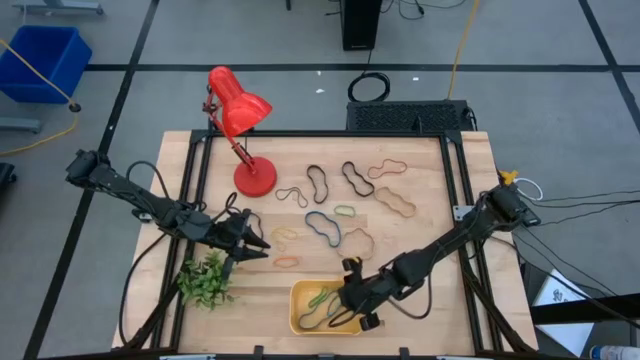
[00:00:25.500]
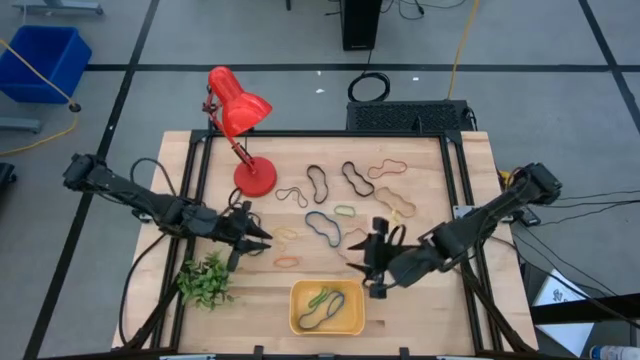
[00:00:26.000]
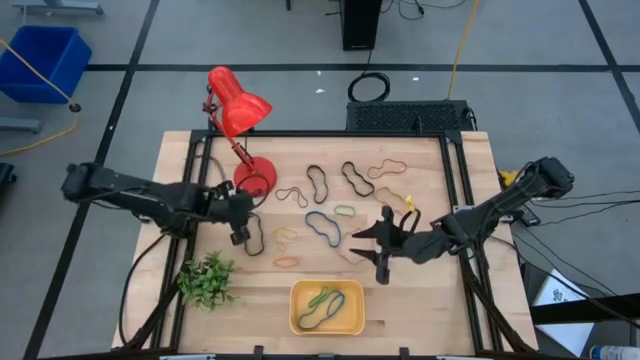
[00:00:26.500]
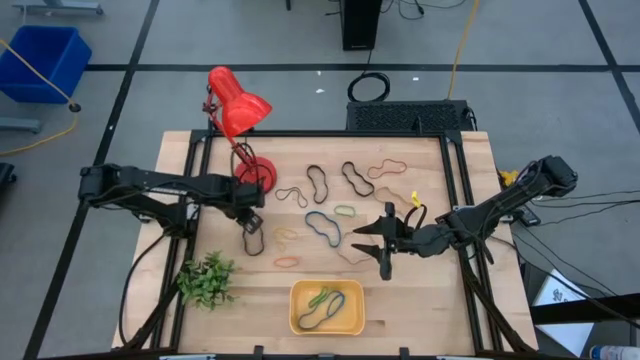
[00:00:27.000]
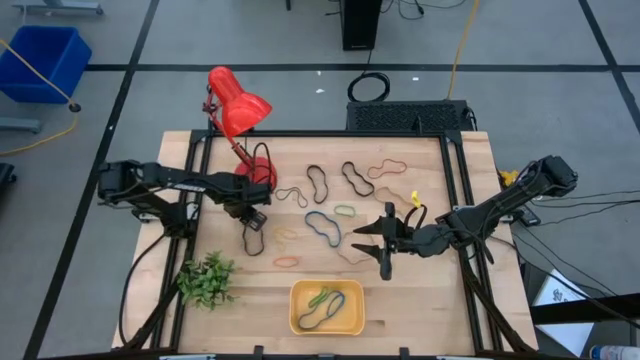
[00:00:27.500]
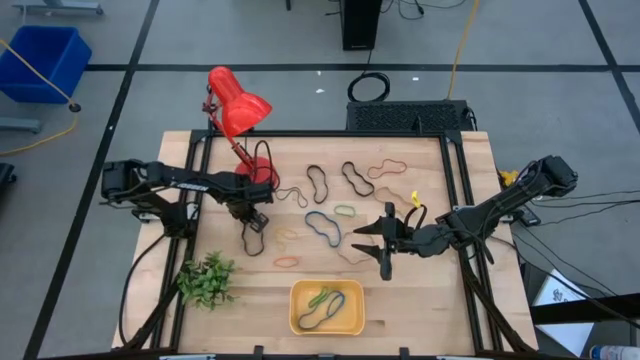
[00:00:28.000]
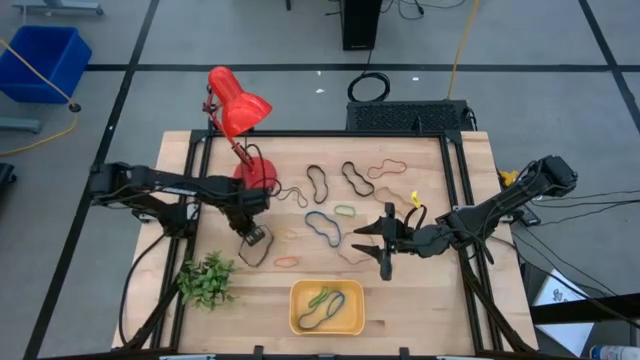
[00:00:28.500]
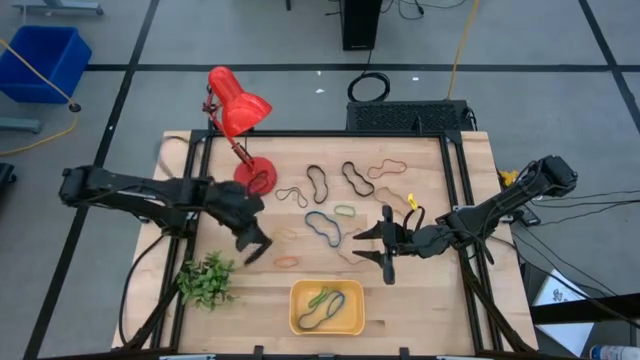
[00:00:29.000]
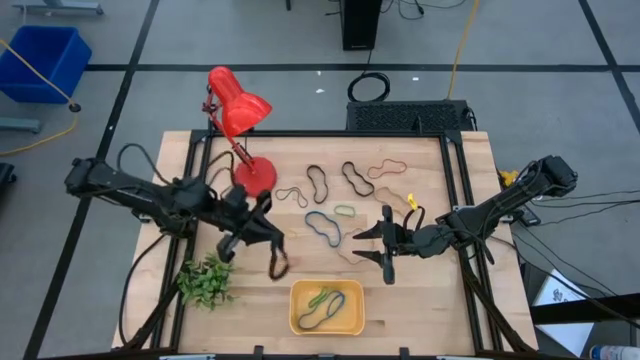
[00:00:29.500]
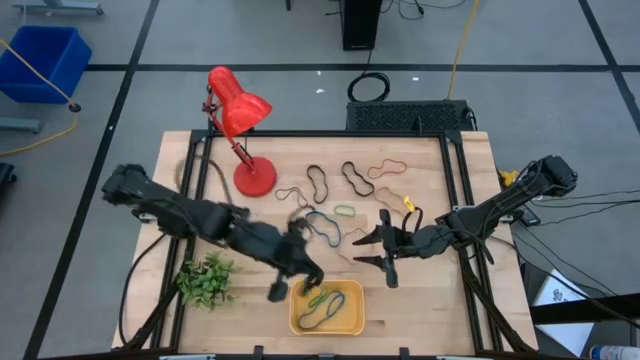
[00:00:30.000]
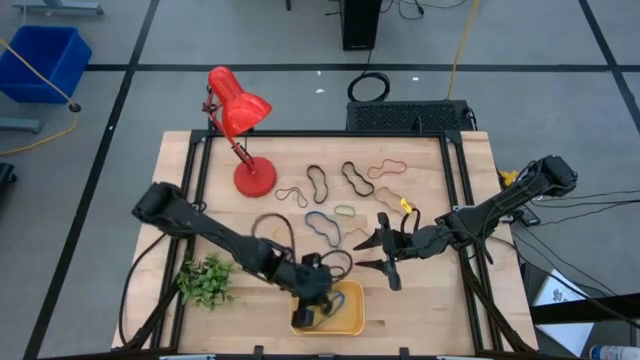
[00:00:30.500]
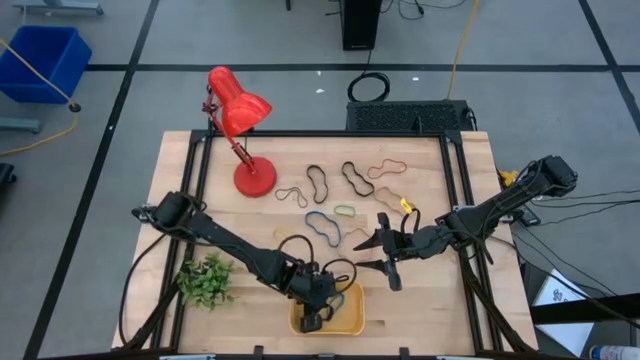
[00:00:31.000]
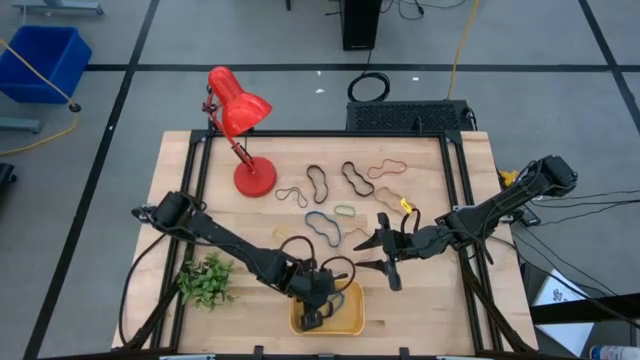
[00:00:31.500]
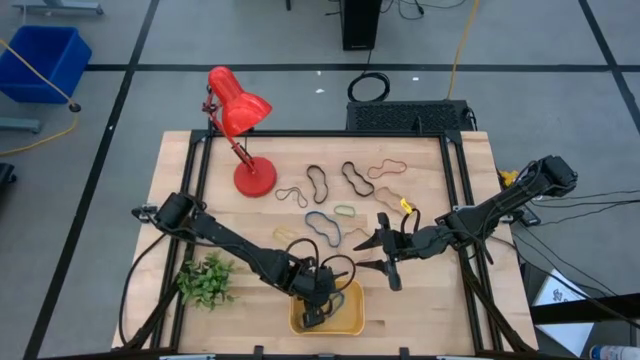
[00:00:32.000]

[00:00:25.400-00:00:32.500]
Task: Pick and place rubber bands into bin
Put the bottom black rubber band into the bin

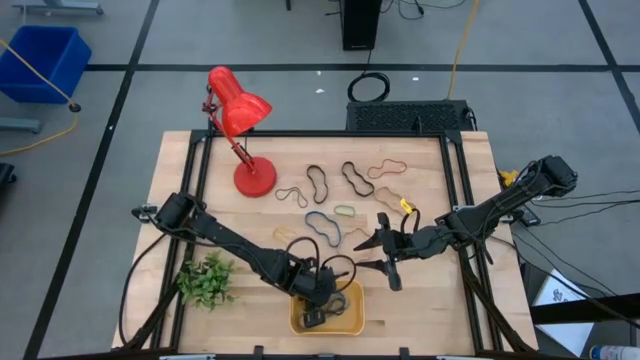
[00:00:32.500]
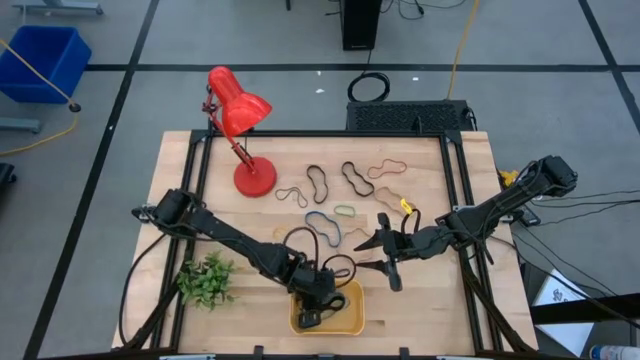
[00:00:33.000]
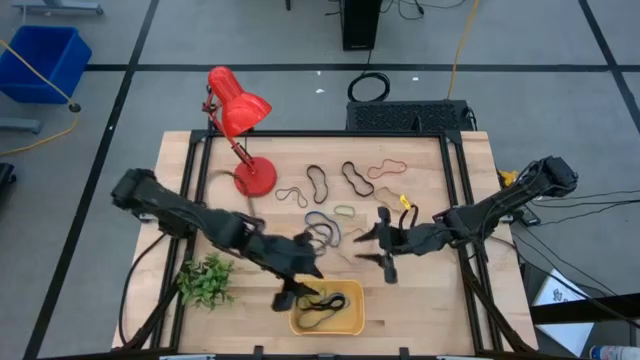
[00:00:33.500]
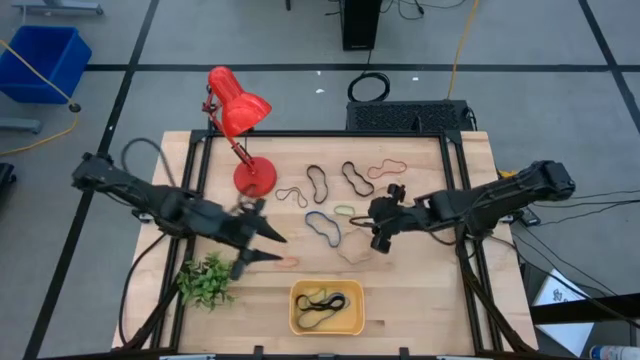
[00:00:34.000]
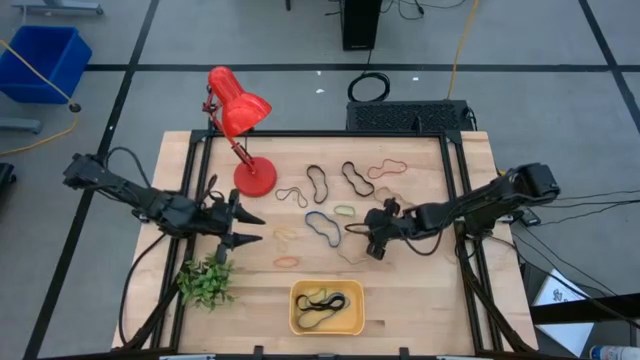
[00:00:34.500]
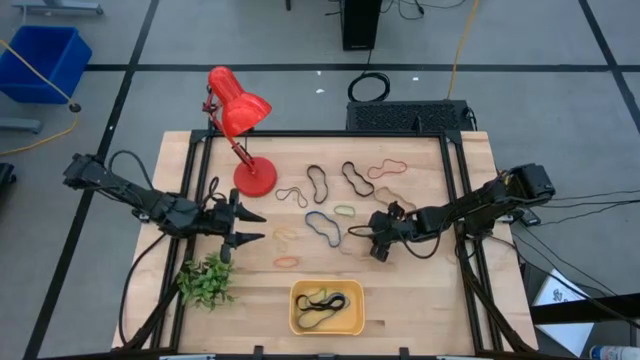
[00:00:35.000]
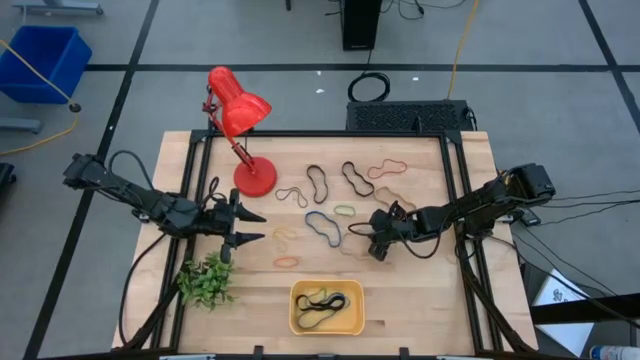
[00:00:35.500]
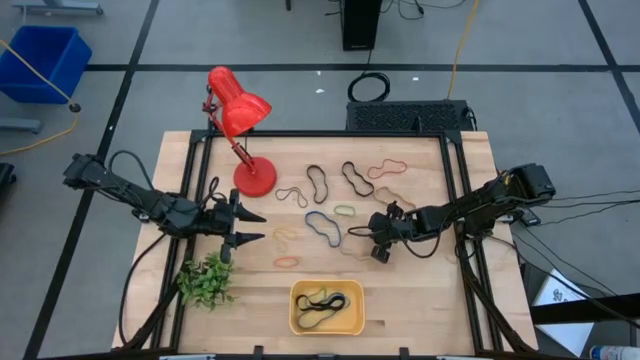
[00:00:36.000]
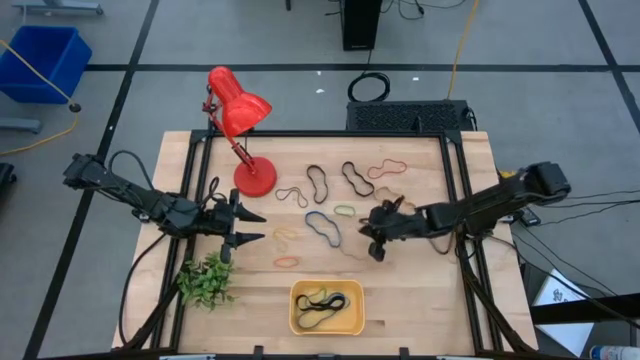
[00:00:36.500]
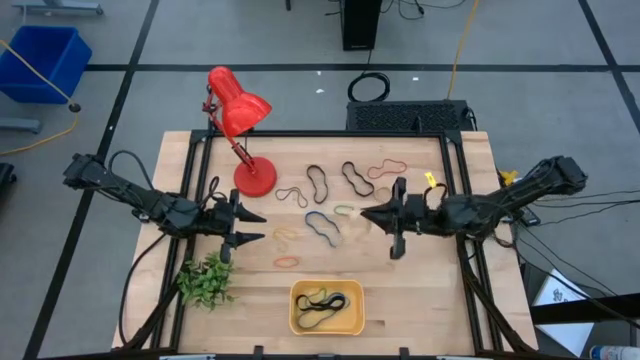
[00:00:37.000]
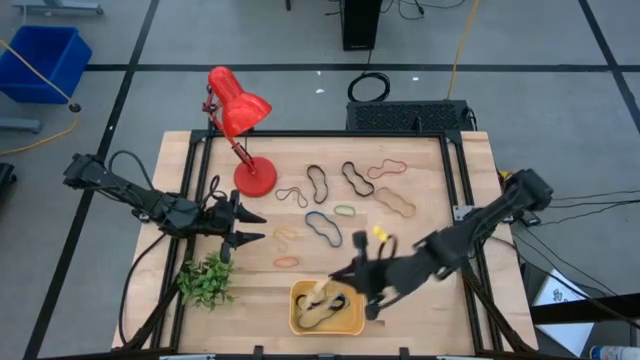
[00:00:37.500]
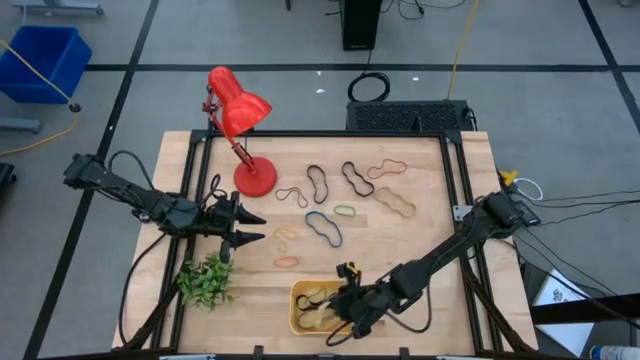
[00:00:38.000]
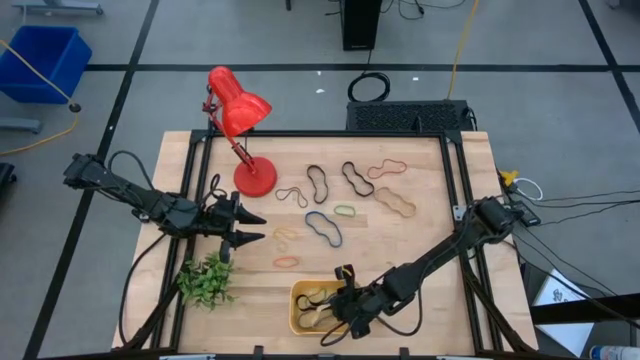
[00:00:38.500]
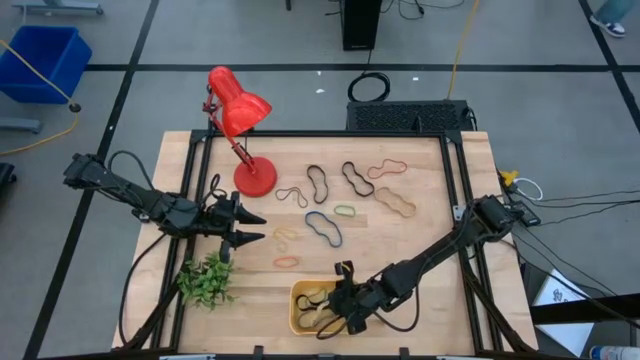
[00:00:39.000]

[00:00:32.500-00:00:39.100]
Put the bottom brown rubber band into the bin

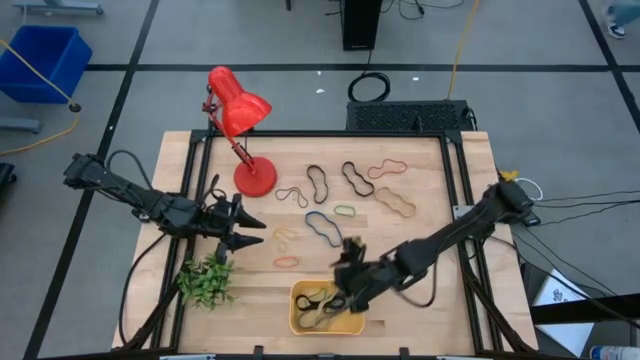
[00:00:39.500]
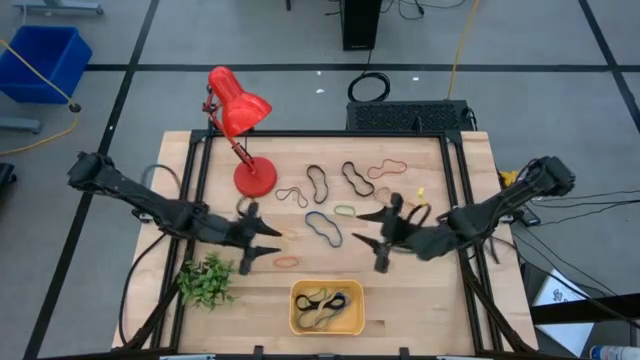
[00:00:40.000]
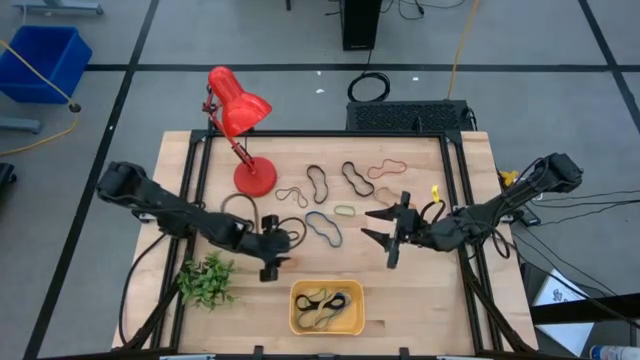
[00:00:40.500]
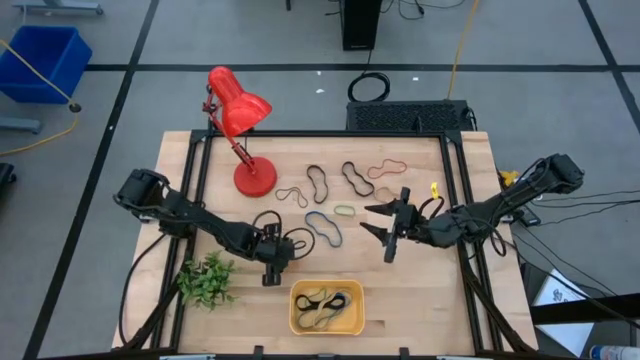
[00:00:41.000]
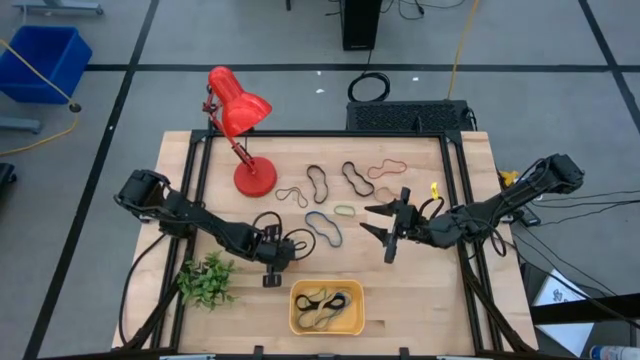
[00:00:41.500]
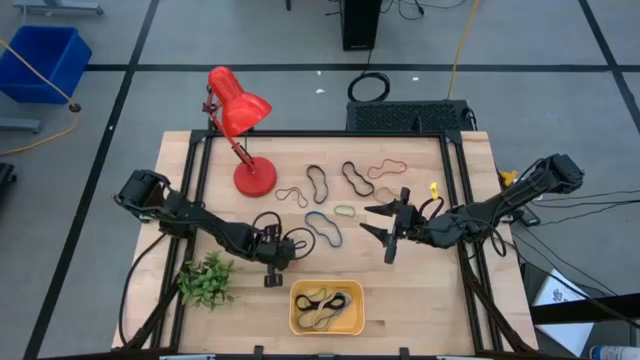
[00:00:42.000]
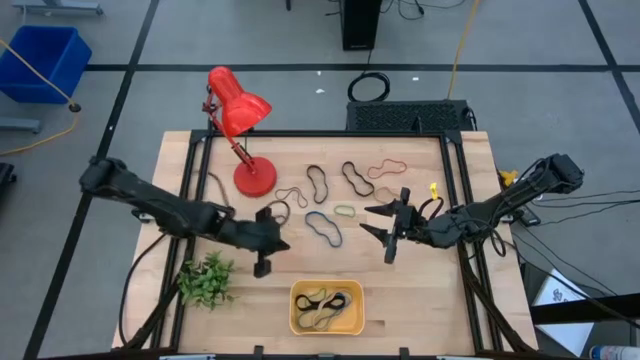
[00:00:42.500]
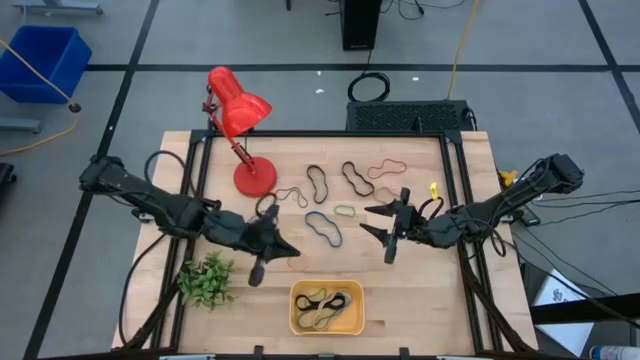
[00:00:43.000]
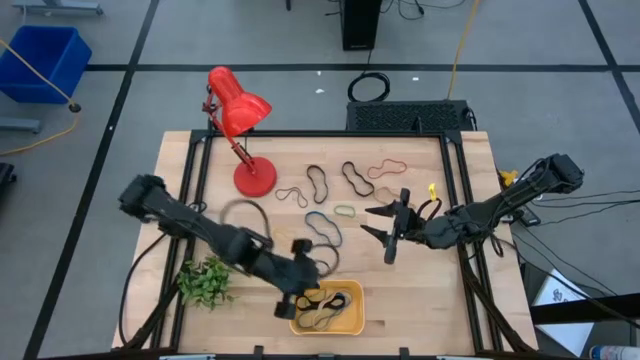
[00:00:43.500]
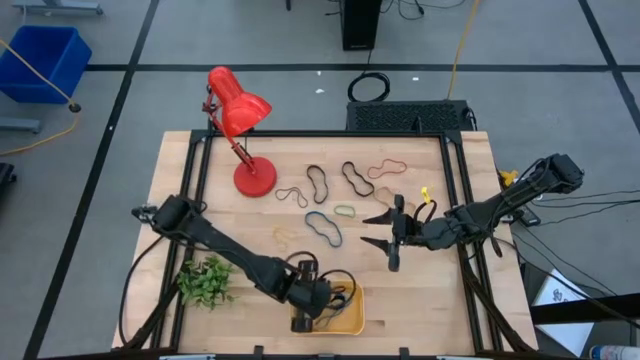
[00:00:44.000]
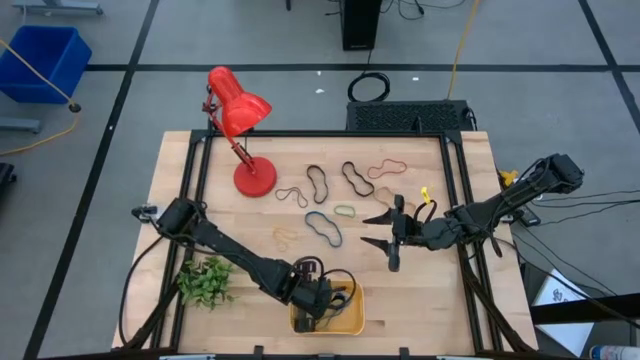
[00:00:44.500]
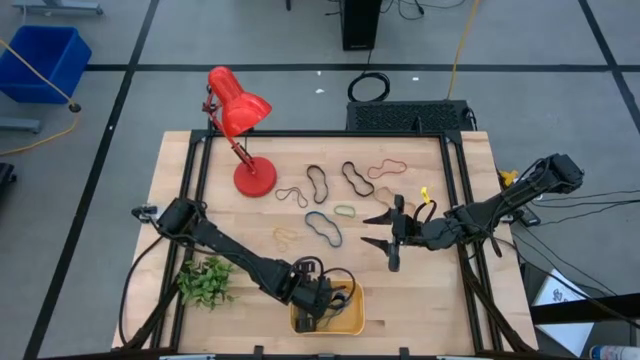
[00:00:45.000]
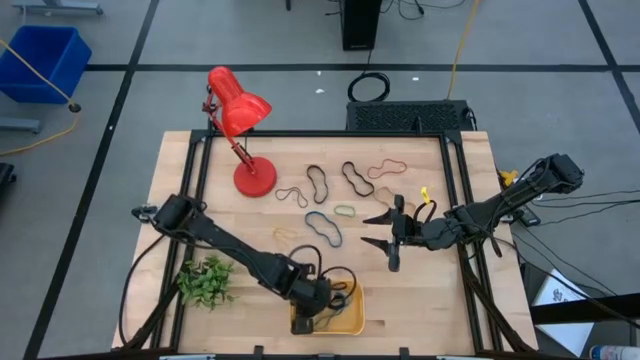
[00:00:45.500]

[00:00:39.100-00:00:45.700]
Put the orange rubber band into the bin
